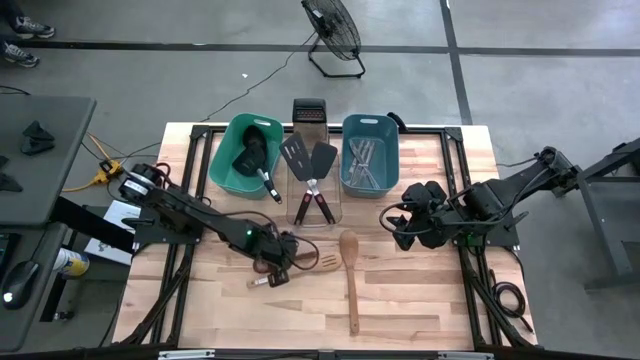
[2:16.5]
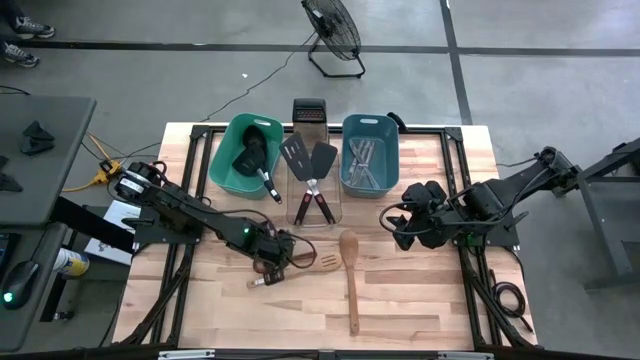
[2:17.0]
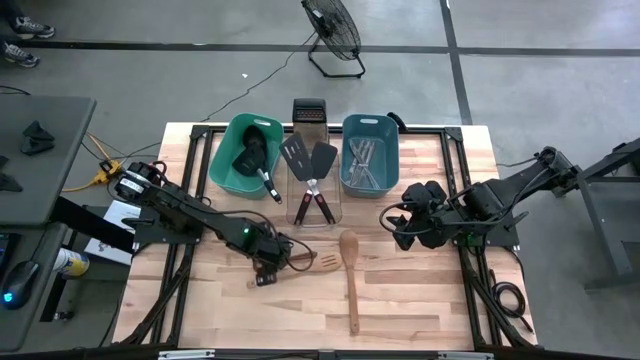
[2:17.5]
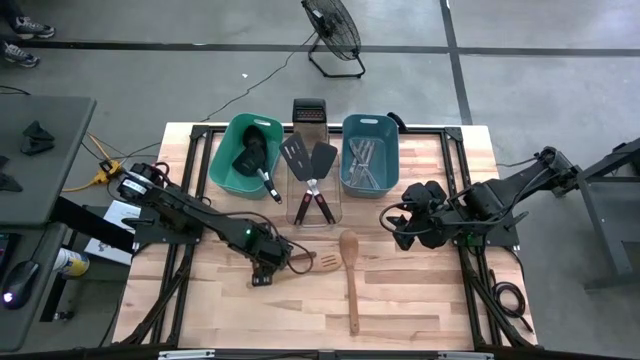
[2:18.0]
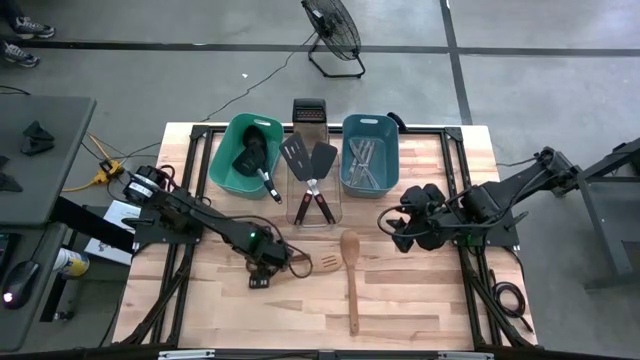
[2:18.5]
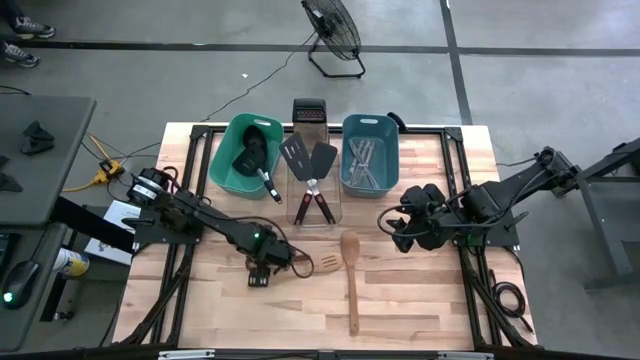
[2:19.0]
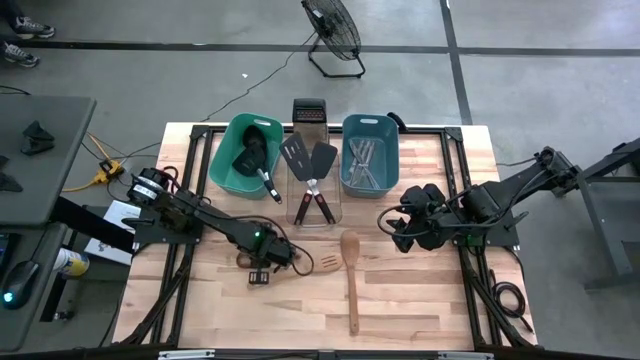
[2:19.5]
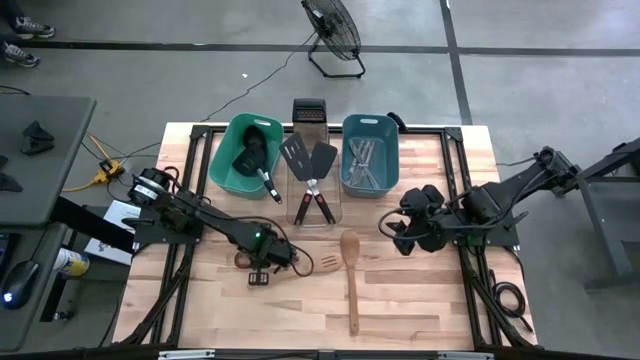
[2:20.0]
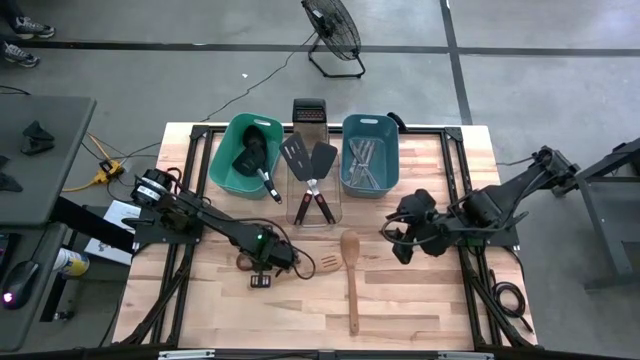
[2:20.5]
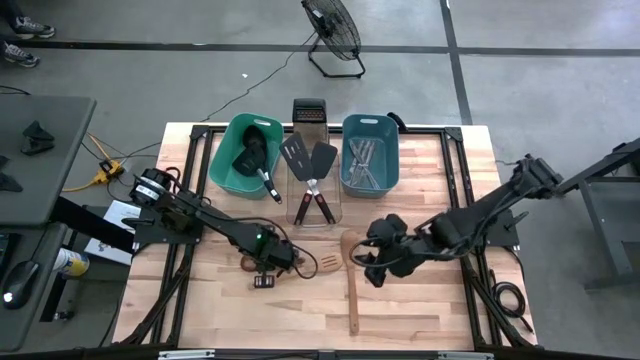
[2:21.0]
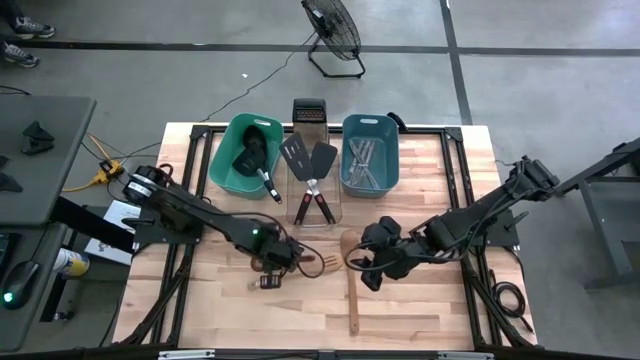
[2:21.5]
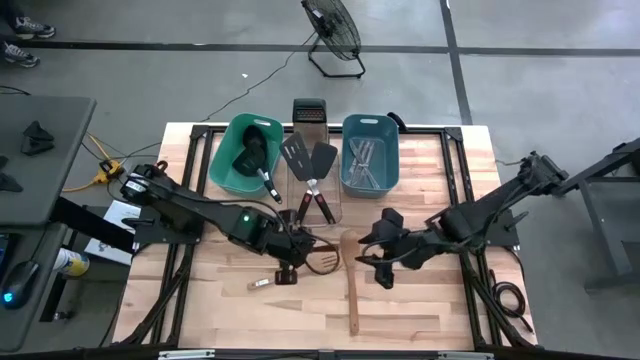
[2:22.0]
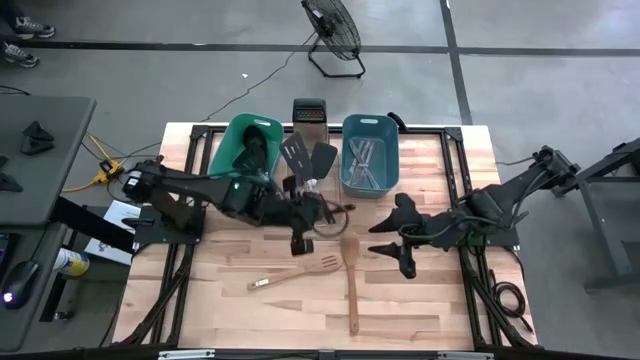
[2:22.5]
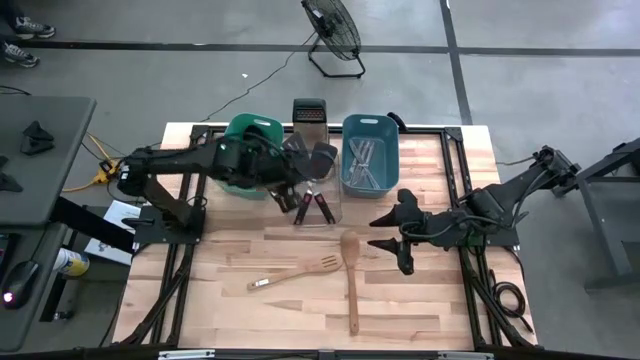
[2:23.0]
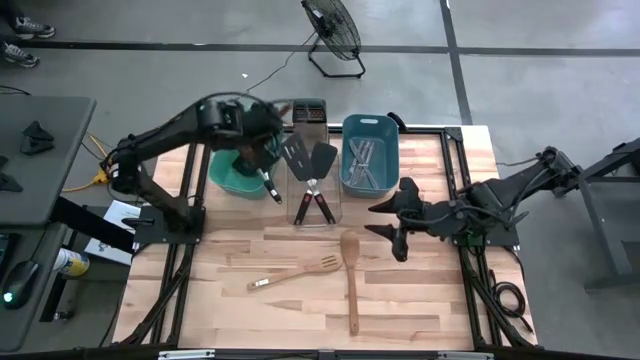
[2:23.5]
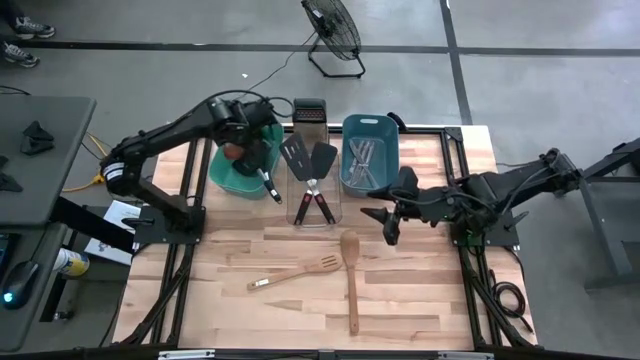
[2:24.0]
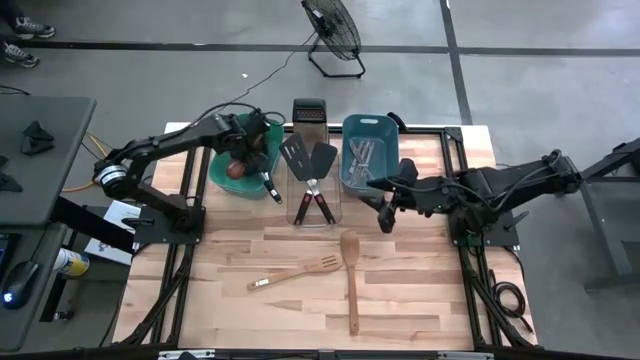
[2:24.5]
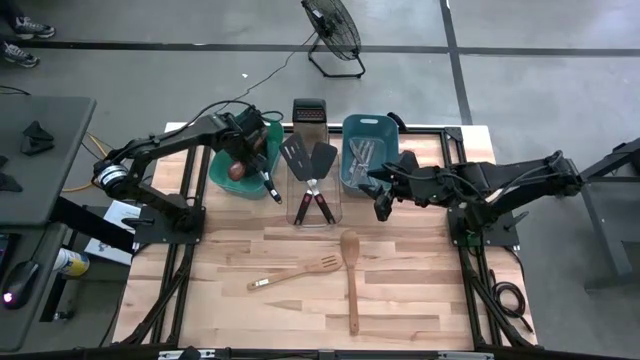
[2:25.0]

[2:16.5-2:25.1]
Task: Pick & Place Kitchen Items
Put the wooden spoon into the green bin

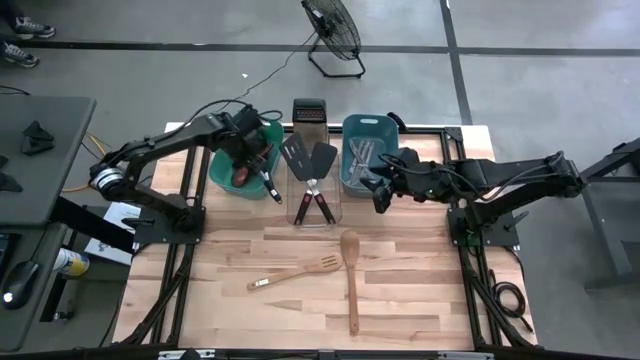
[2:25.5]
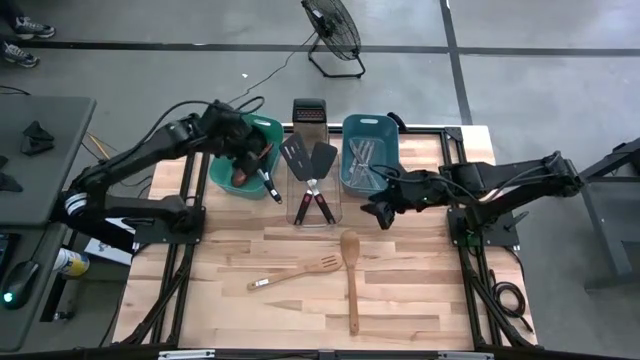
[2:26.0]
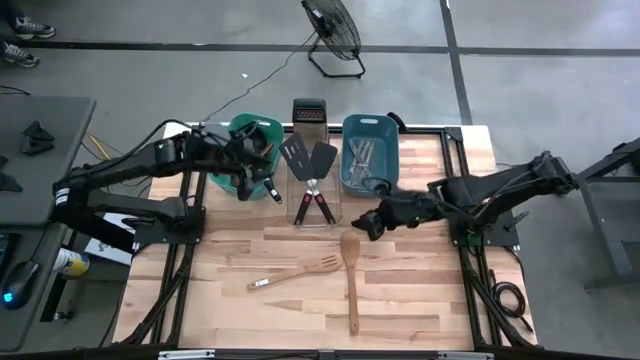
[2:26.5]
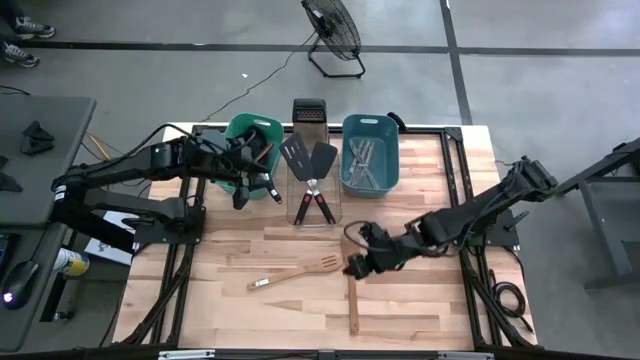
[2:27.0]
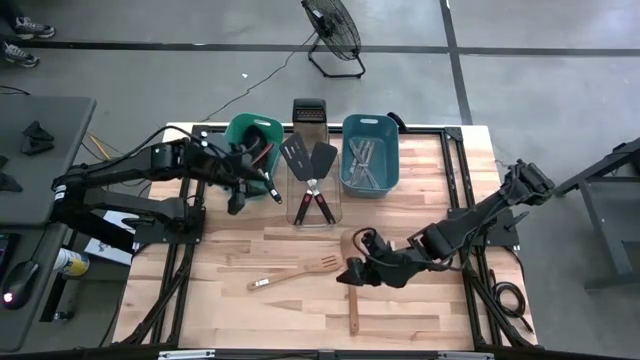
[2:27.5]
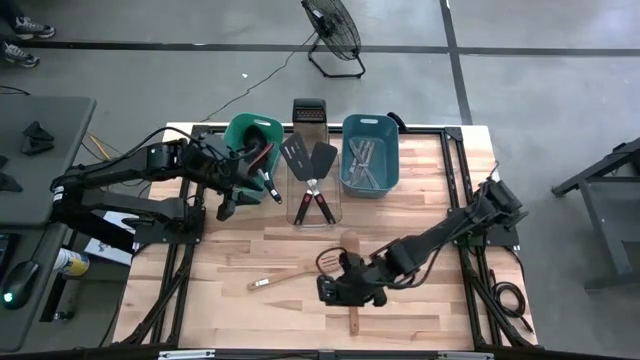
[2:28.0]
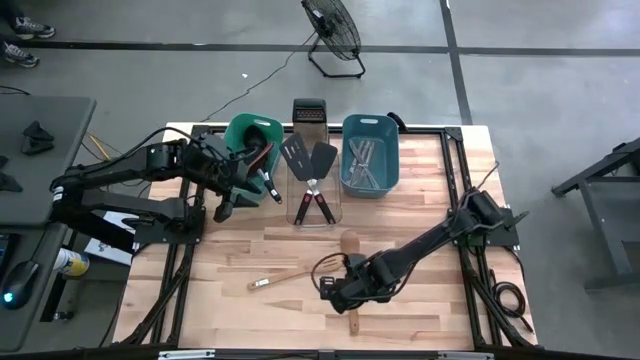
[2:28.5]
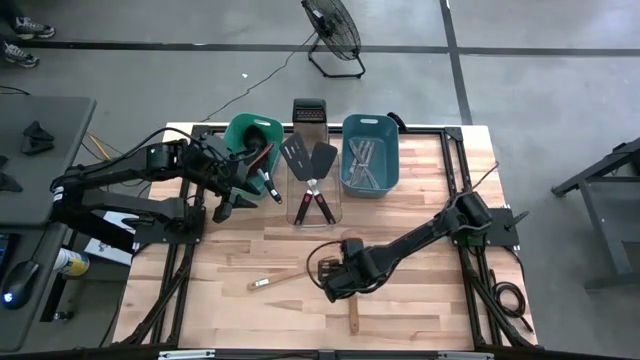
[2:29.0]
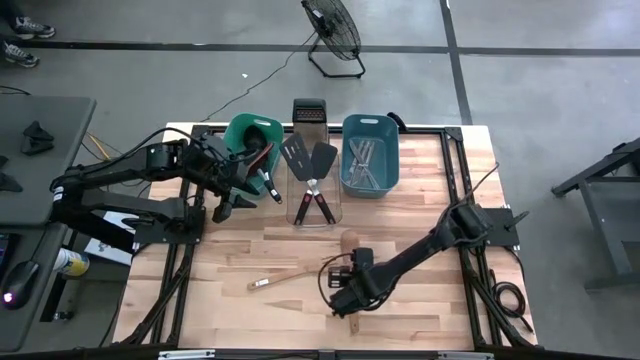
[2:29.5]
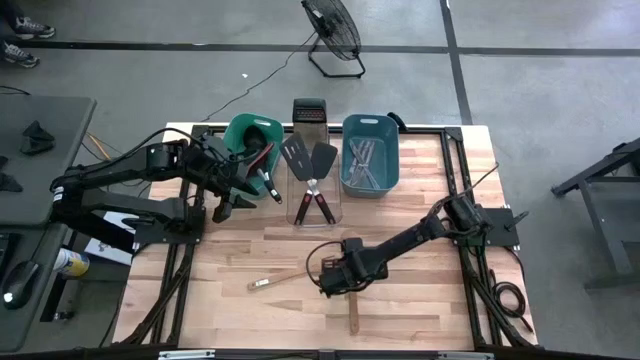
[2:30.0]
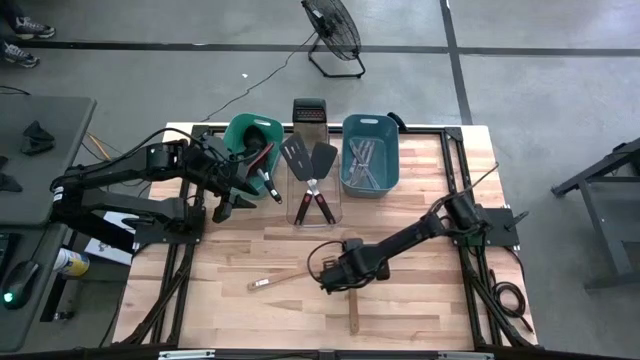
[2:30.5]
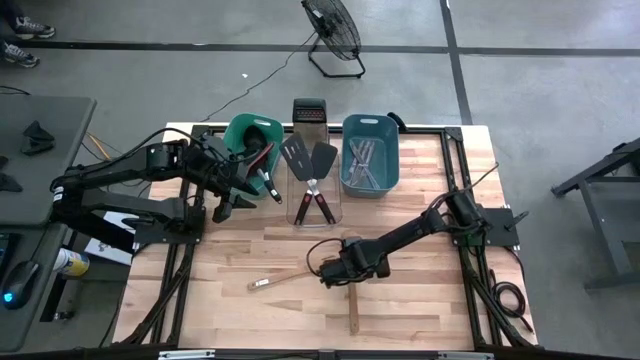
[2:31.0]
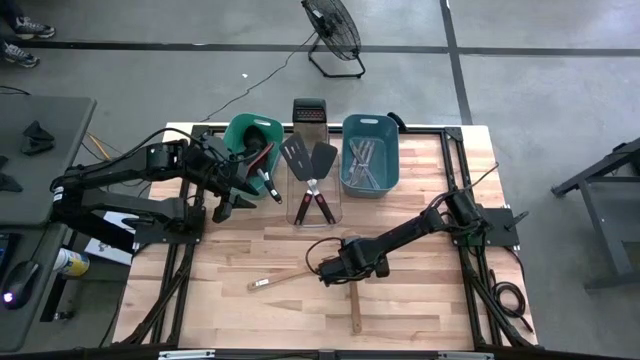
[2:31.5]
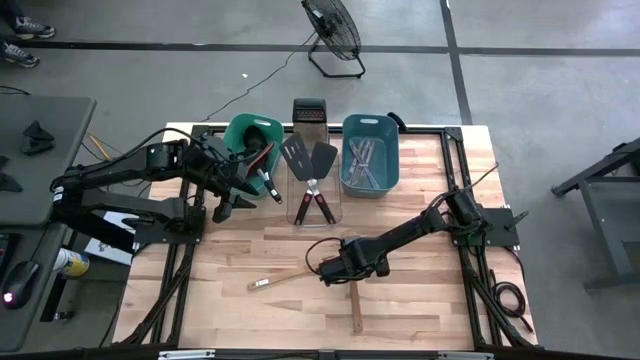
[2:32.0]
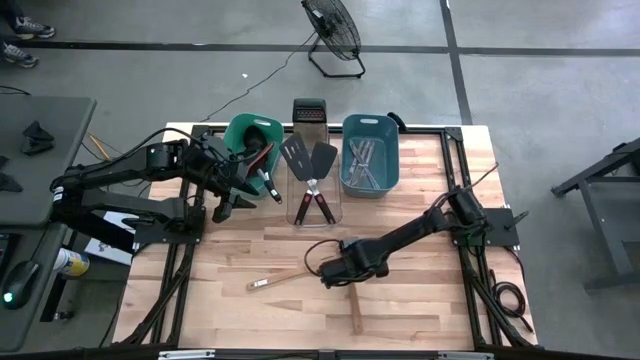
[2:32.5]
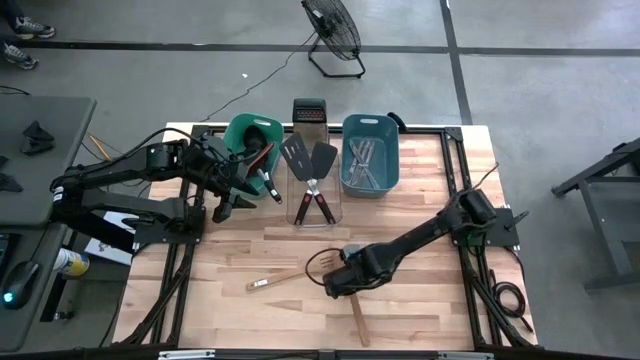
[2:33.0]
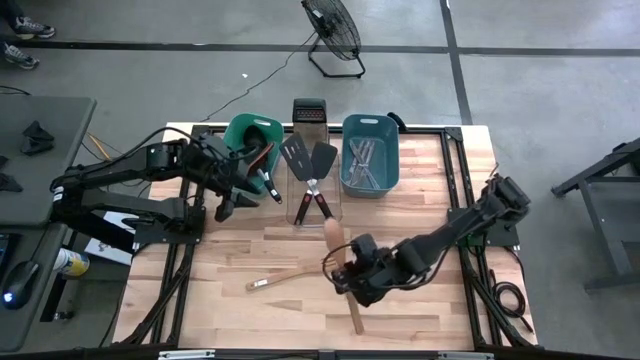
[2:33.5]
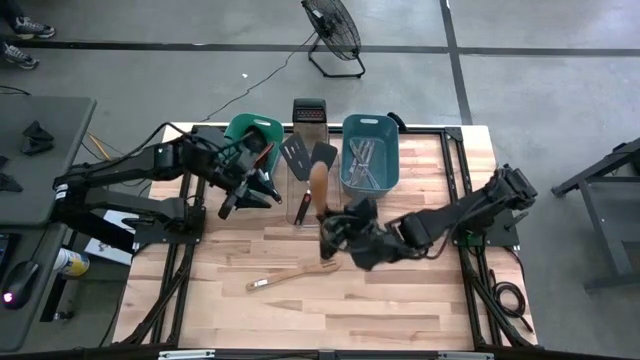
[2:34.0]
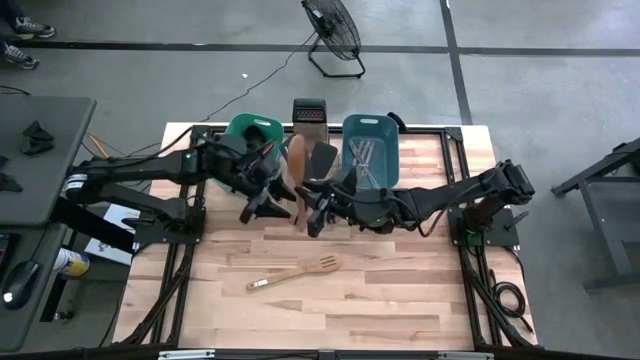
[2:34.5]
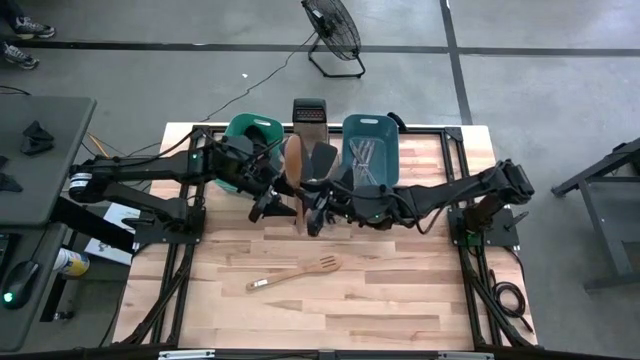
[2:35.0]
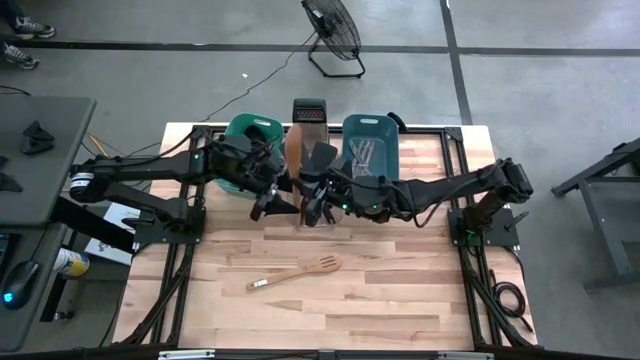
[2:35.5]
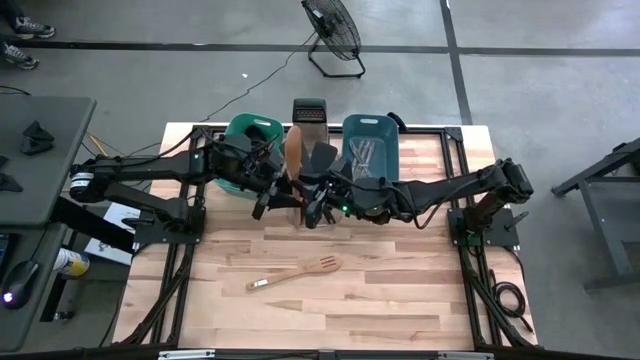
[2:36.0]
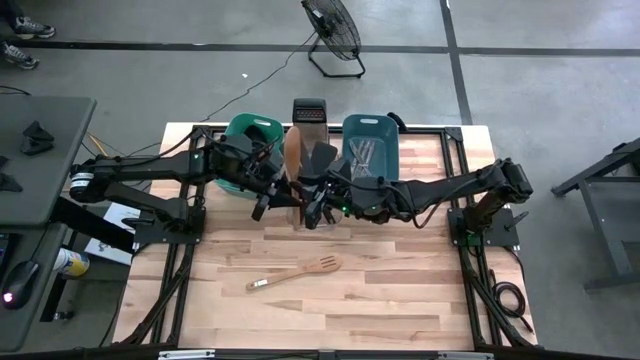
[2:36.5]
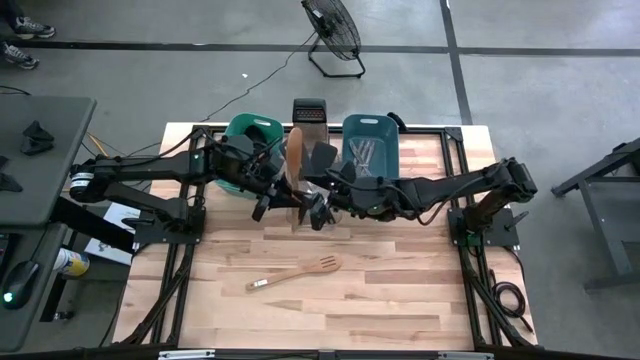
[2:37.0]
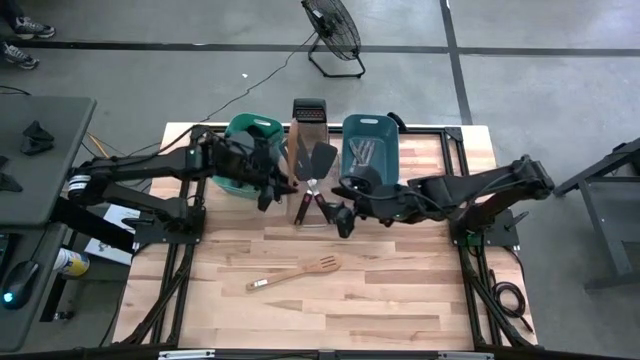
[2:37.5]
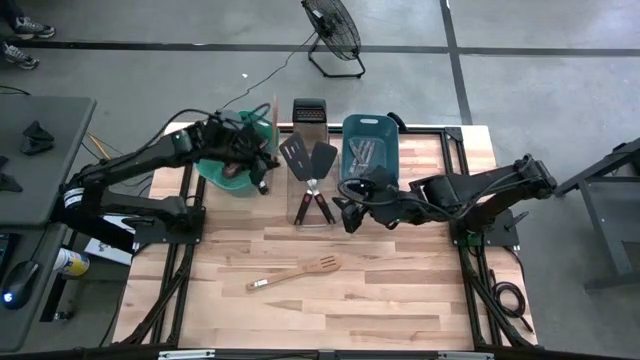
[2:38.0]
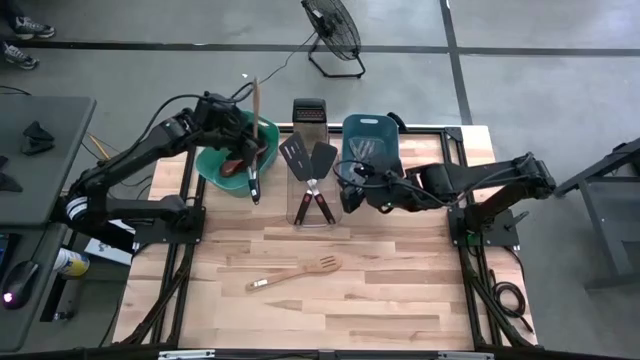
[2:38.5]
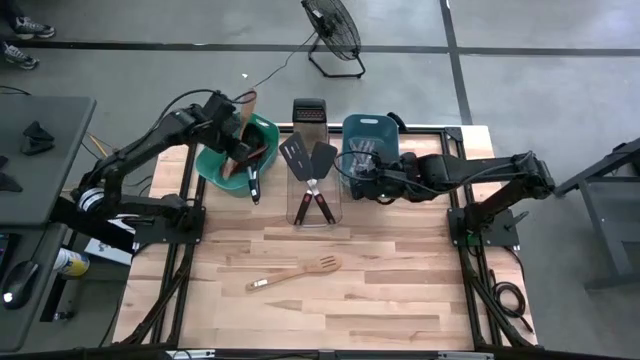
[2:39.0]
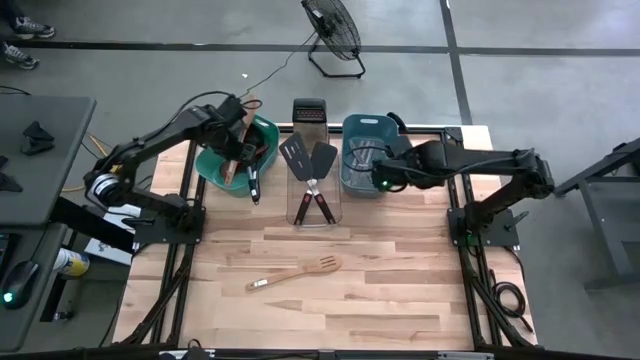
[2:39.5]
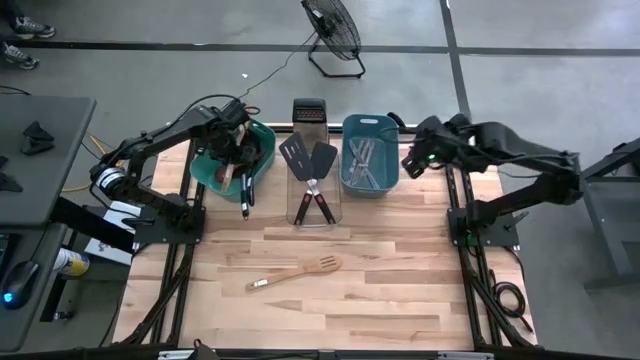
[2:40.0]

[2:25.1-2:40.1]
Put the wooden serving spoon into the green bin
